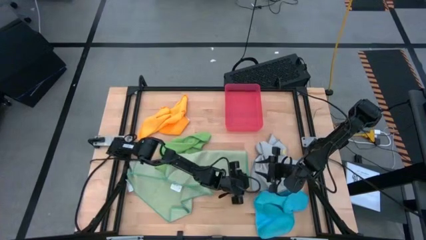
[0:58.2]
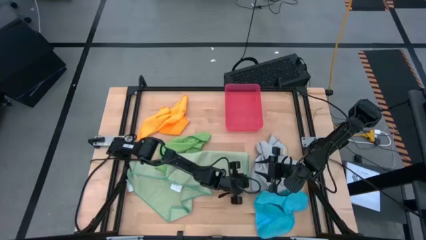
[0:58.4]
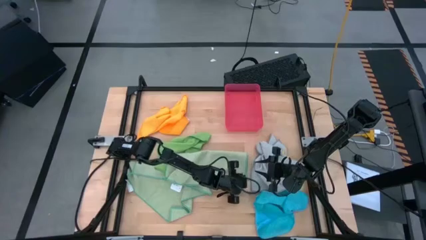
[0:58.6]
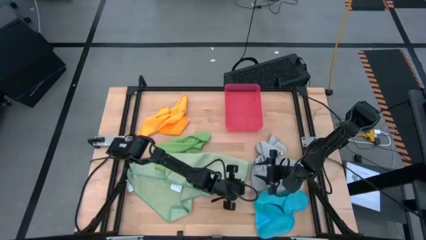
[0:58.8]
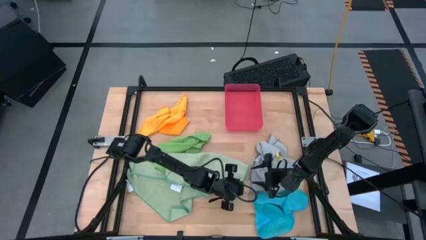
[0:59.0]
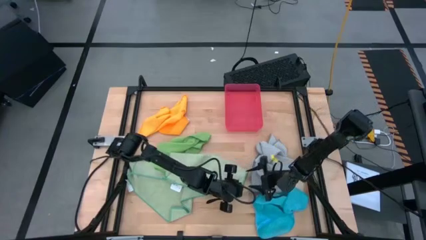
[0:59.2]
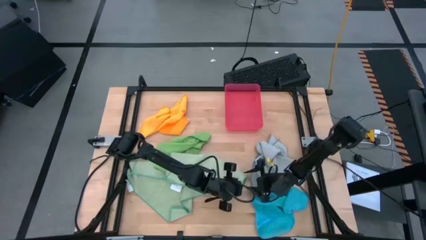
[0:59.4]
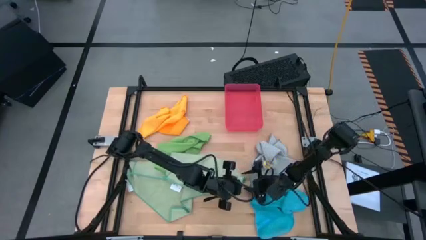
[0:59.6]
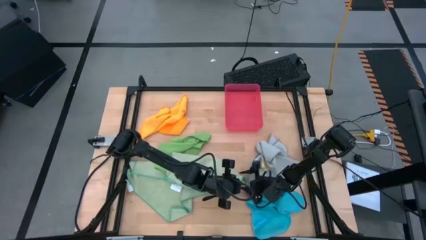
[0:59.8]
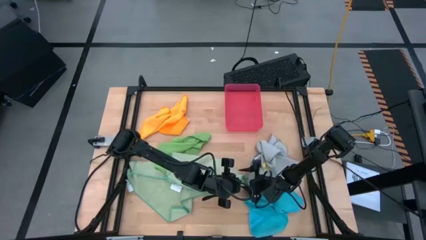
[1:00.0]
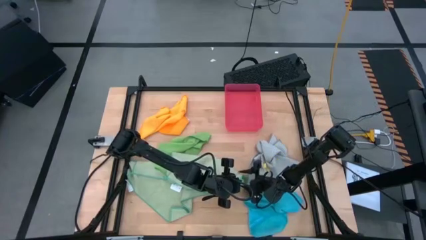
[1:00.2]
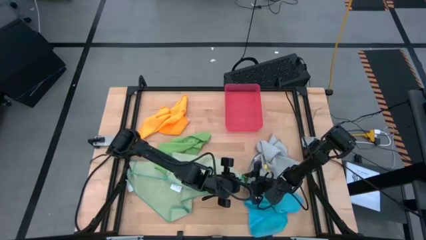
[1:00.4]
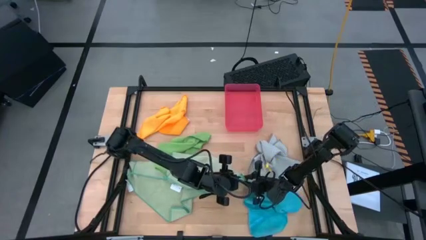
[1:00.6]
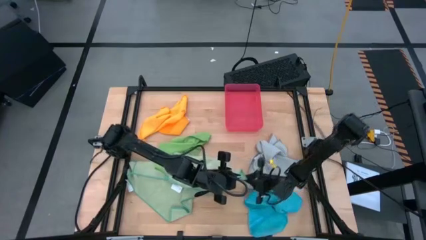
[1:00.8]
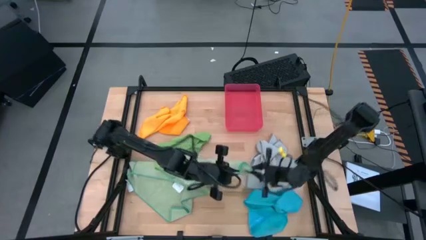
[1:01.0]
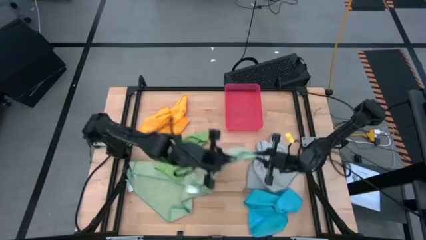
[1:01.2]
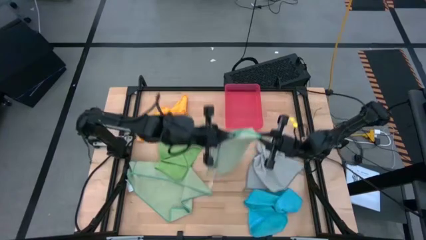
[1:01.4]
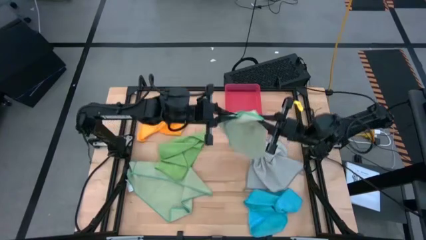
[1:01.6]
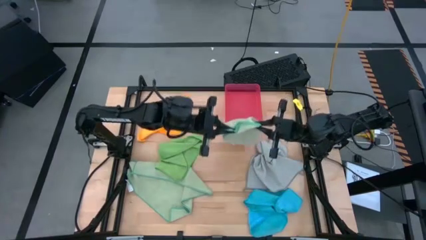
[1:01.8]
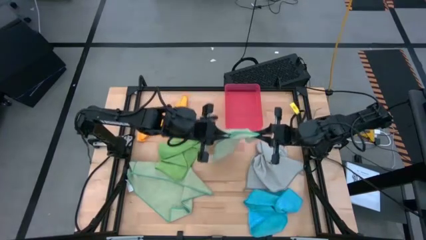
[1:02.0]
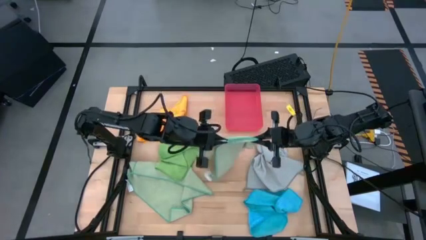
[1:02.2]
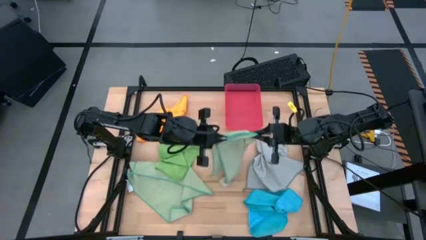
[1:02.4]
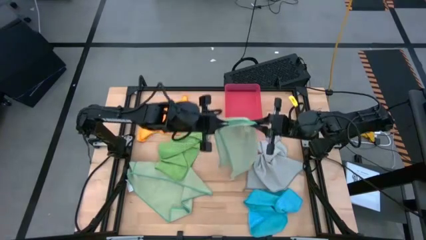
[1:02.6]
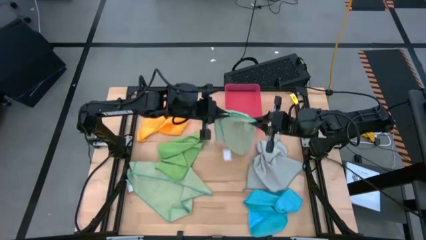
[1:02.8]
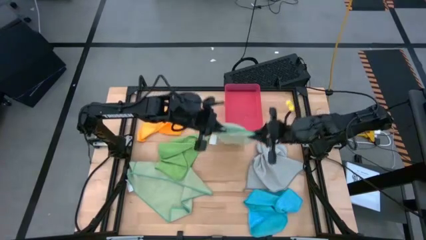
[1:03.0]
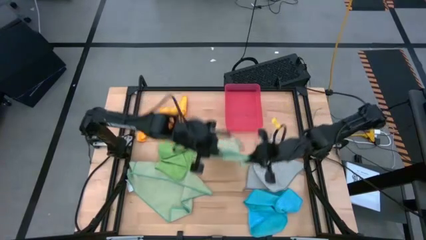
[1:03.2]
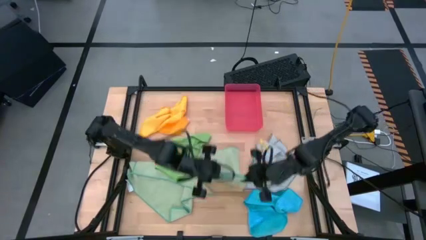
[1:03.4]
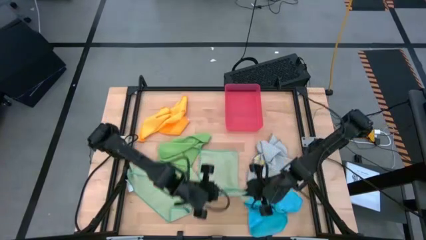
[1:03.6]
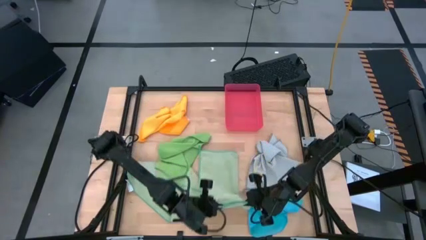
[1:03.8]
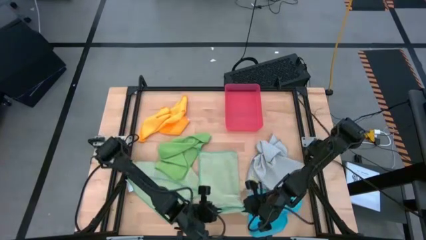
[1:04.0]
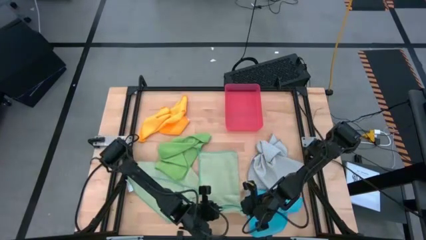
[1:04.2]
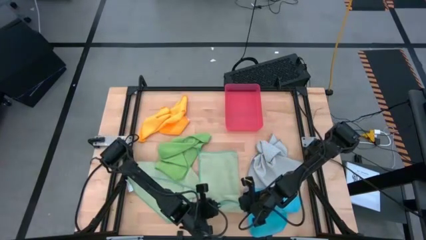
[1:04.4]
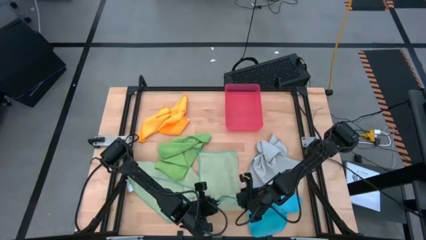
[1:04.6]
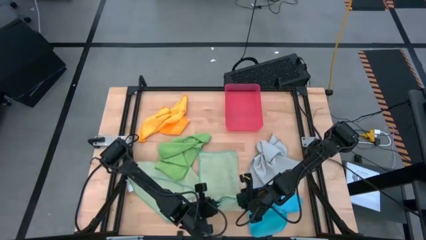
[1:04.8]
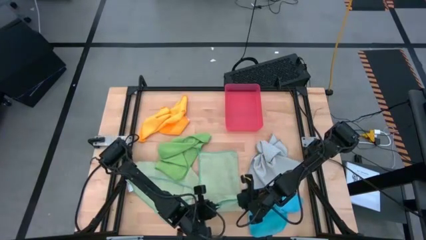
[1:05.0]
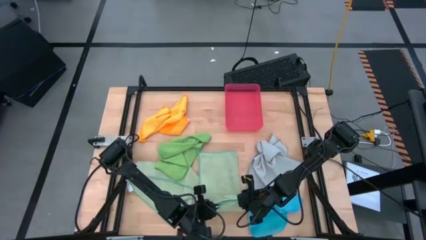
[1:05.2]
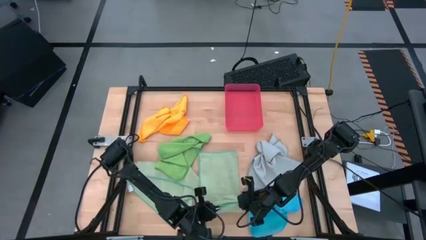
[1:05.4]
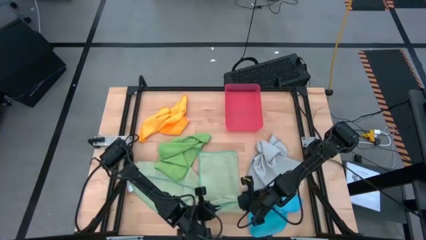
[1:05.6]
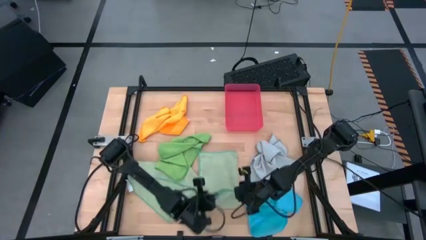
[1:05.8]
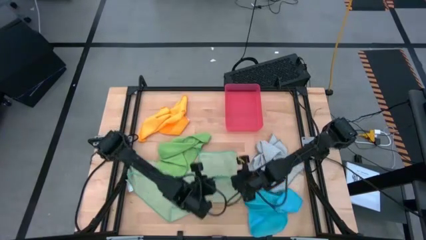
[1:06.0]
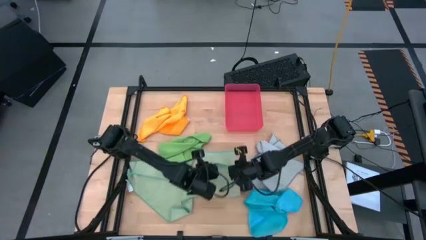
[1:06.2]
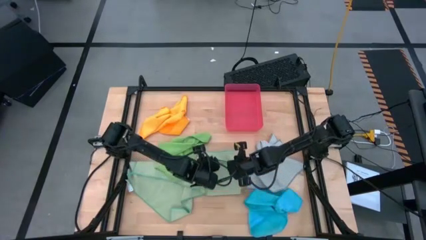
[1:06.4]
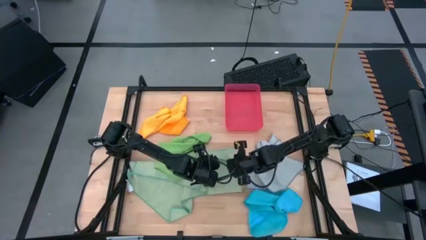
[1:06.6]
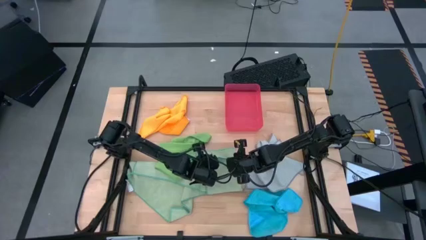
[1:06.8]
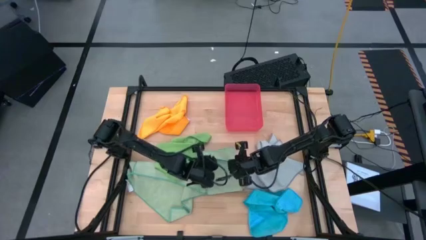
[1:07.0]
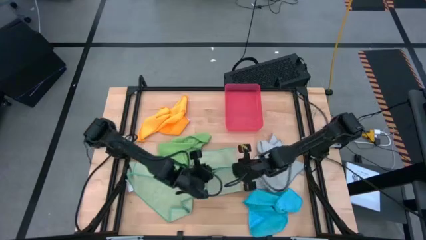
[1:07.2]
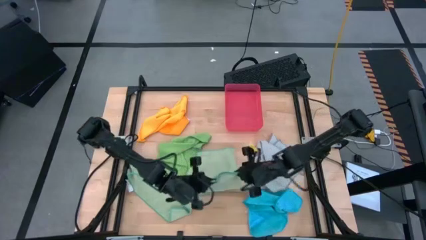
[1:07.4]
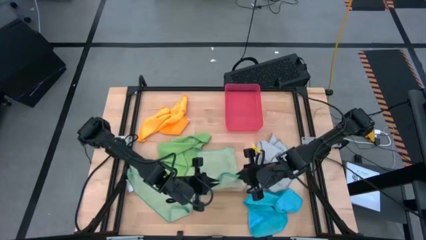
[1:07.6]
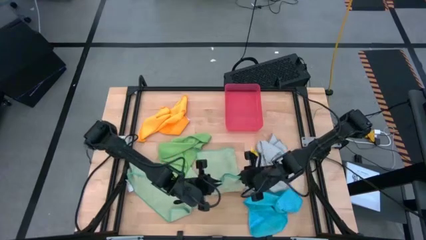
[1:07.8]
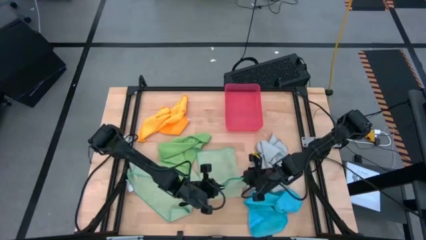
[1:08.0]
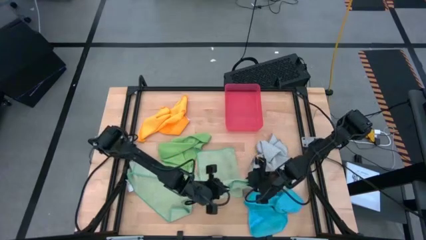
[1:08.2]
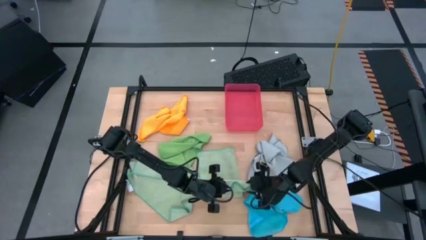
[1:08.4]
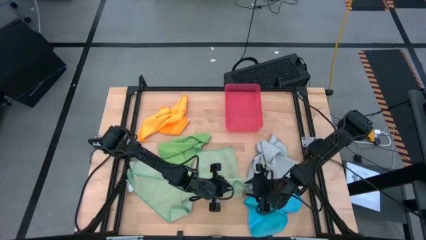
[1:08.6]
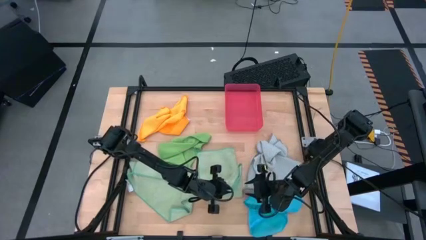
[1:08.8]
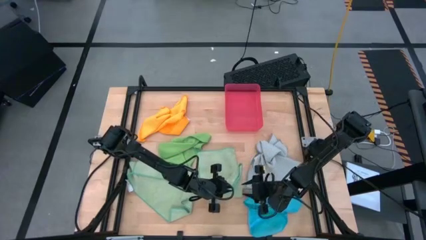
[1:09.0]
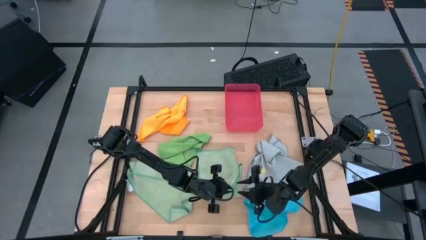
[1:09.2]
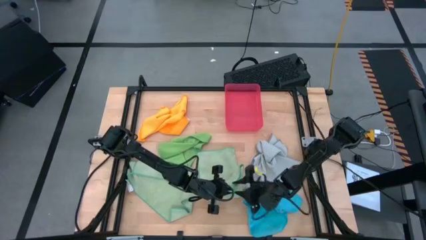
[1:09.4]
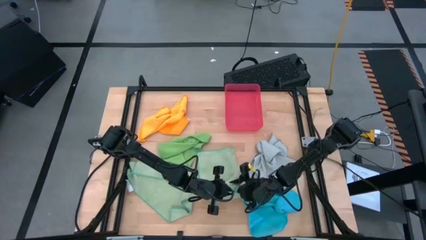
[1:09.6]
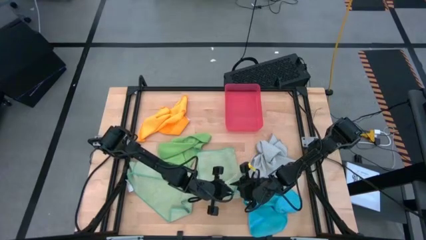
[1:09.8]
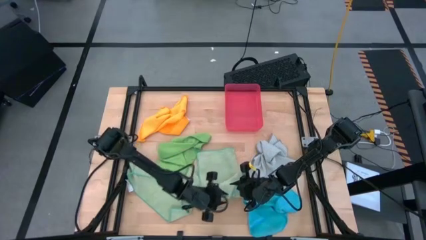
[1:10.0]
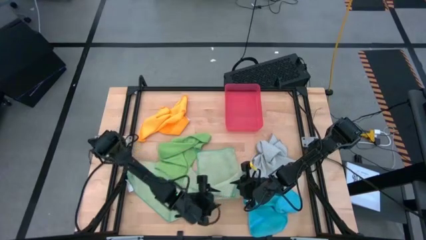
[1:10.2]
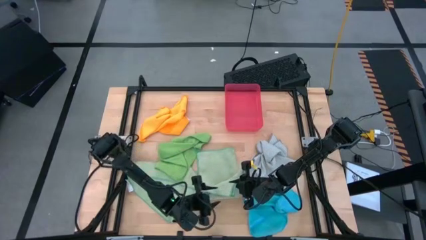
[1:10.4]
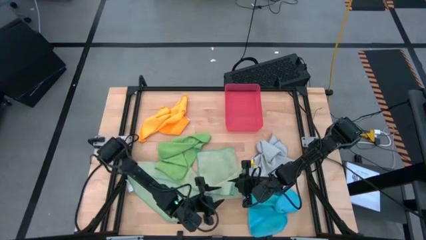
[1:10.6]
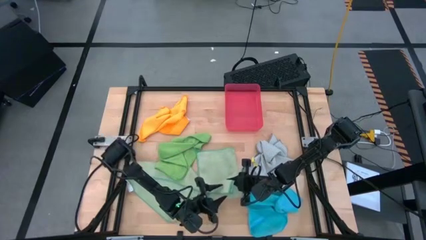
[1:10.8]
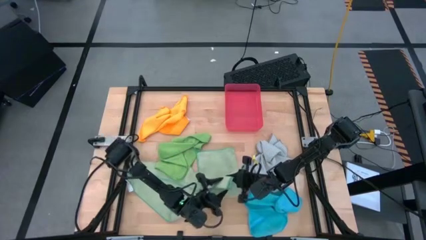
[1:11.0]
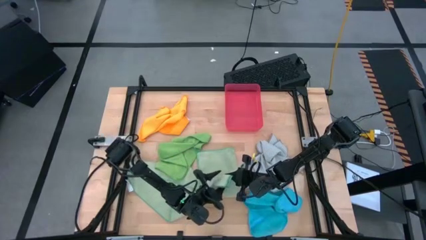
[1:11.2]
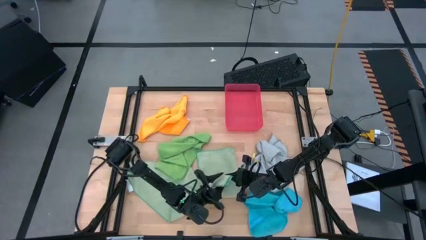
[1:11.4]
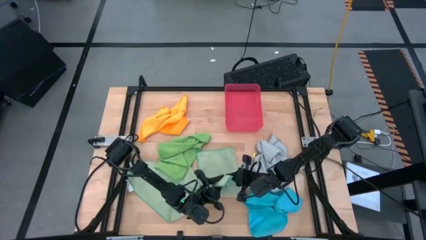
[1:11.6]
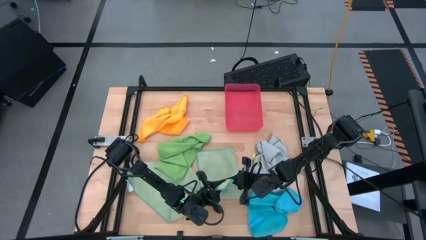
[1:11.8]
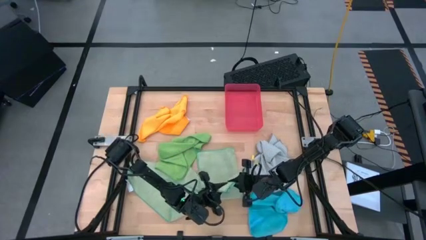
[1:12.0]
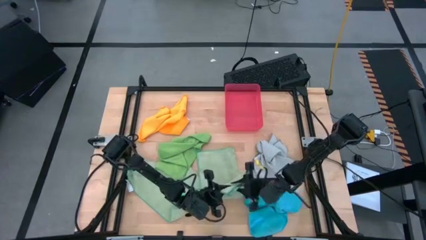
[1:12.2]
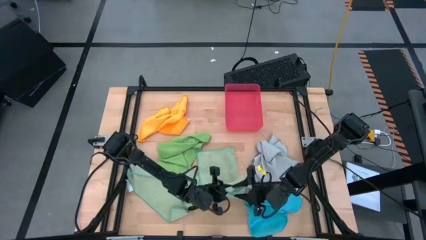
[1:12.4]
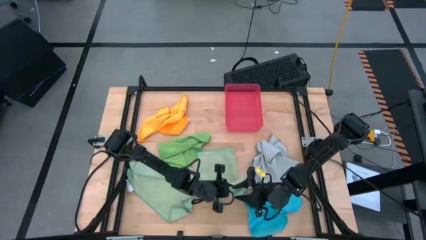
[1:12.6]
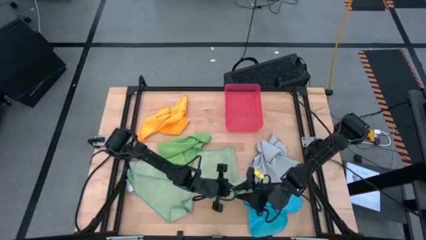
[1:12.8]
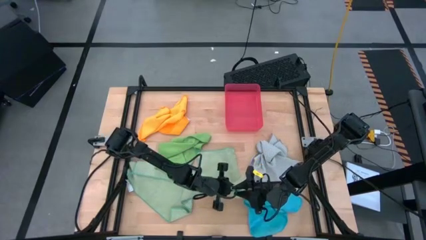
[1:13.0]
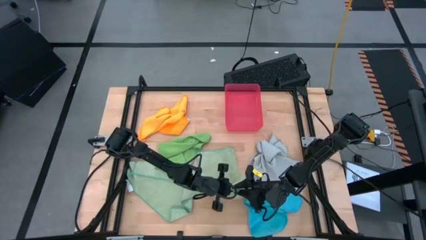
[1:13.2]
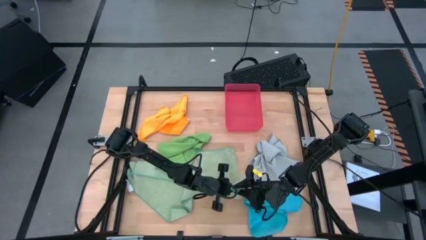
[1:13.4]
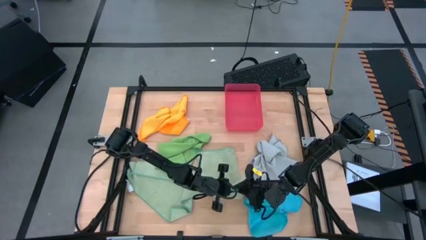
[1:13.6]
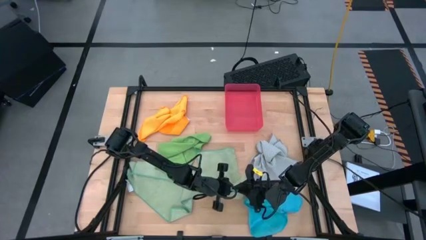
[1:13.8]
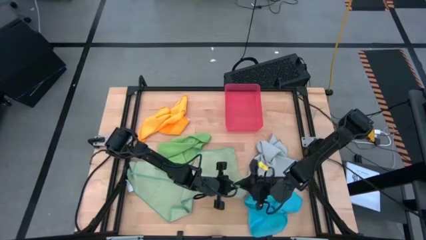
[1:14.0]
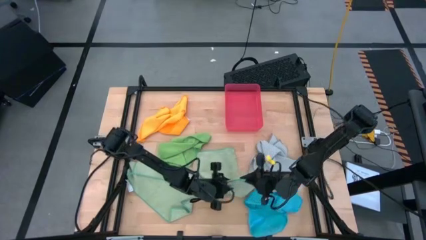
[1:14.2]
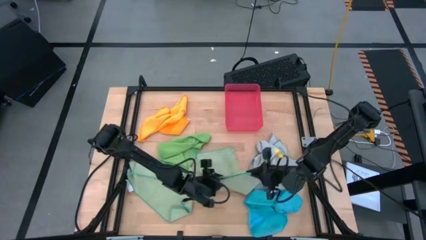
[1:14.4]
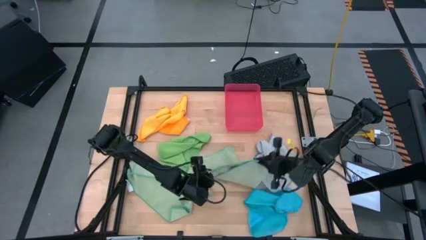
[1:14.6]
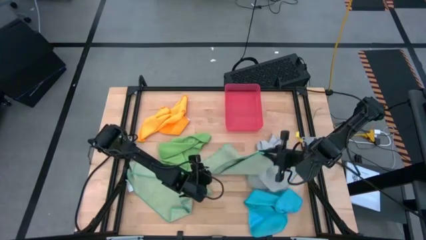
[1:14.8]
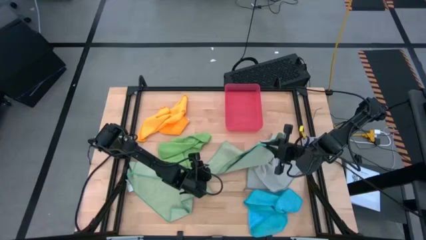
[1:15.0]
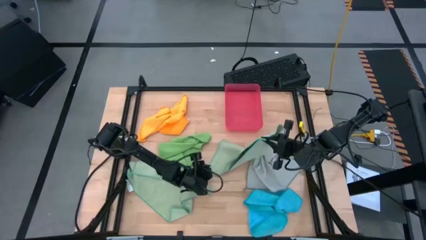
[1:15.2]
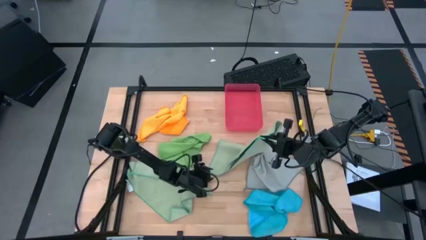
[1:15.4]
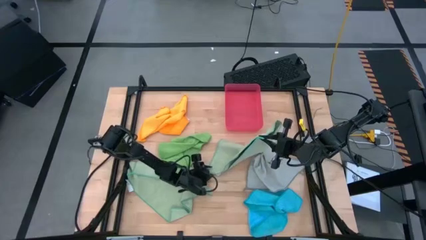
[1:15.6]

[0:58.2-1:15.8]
Task: Fold microfiber towels
Fold the right light green microfiber cloth
